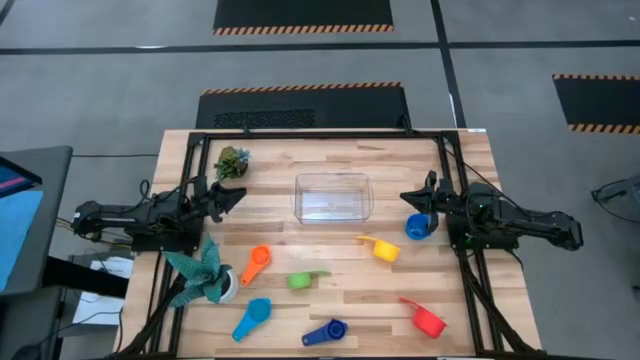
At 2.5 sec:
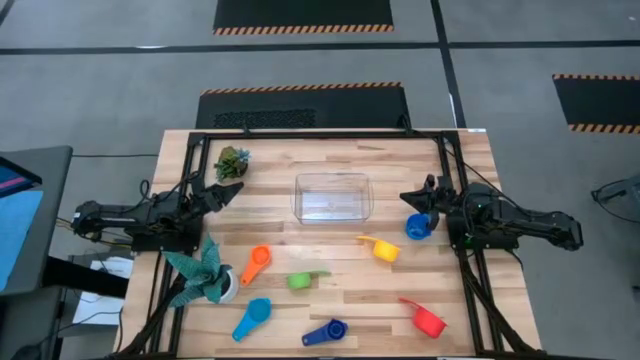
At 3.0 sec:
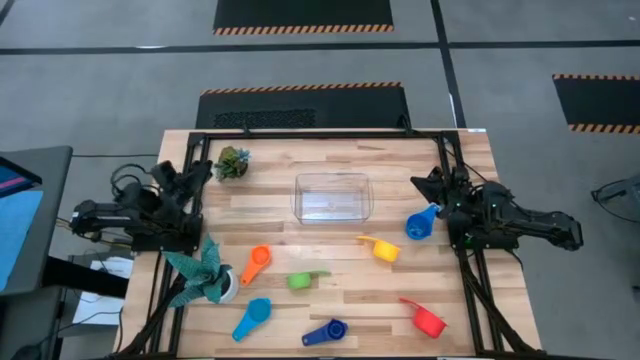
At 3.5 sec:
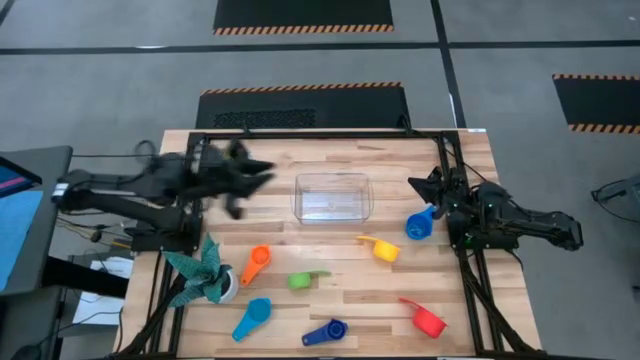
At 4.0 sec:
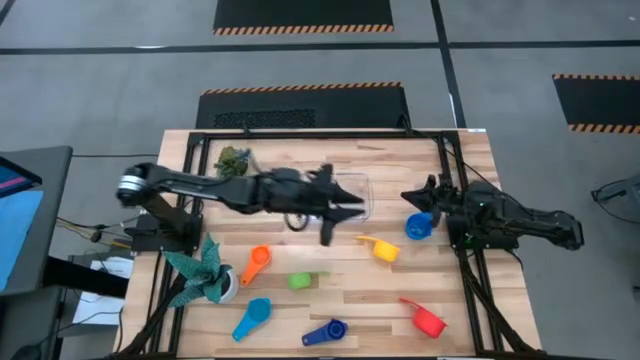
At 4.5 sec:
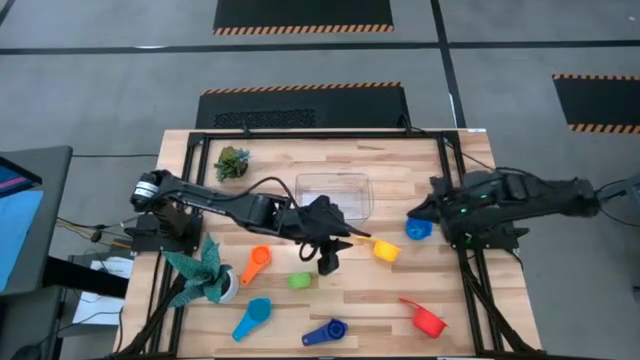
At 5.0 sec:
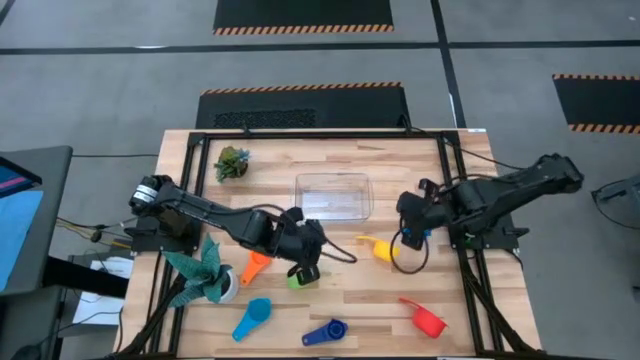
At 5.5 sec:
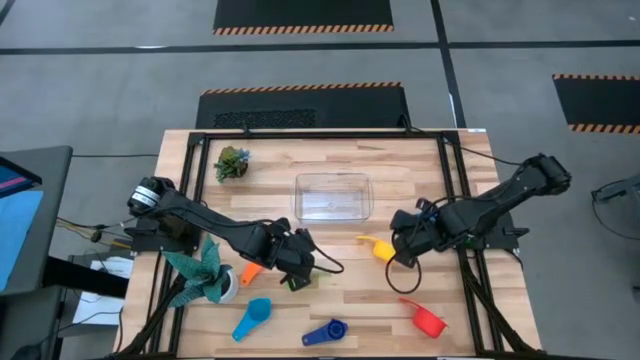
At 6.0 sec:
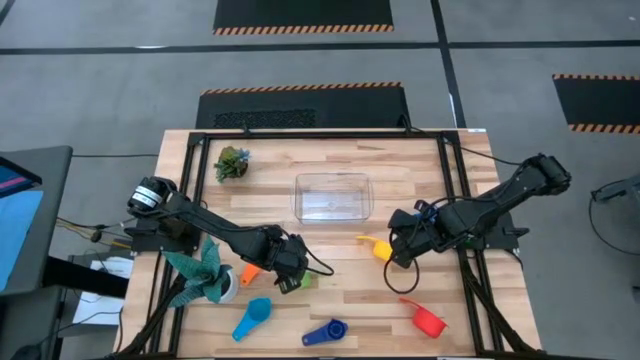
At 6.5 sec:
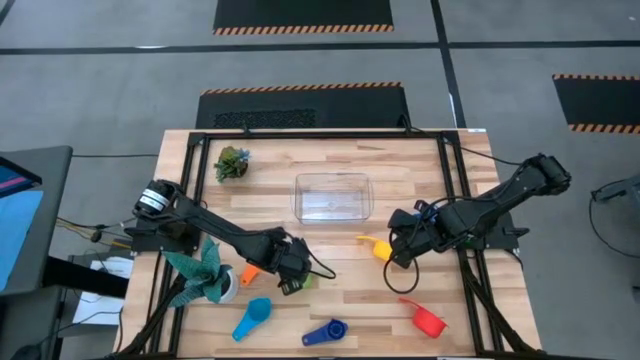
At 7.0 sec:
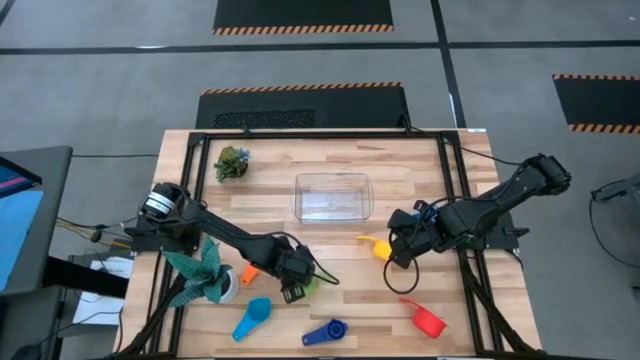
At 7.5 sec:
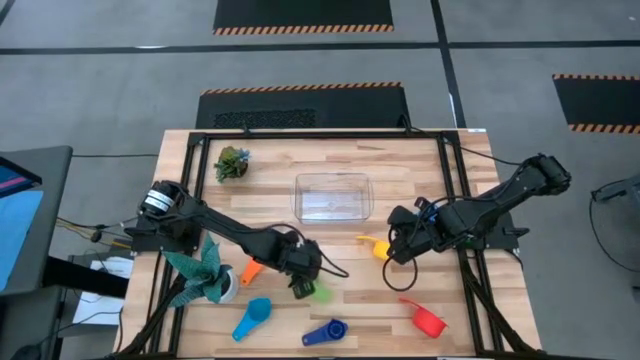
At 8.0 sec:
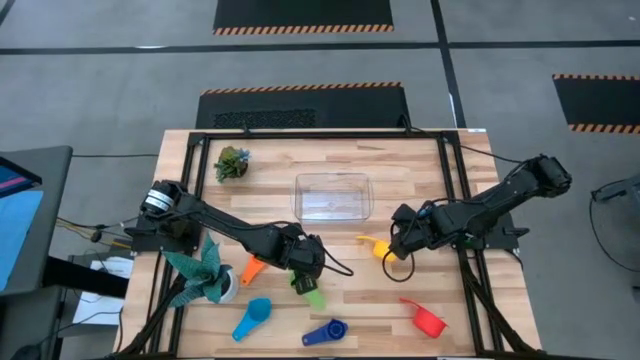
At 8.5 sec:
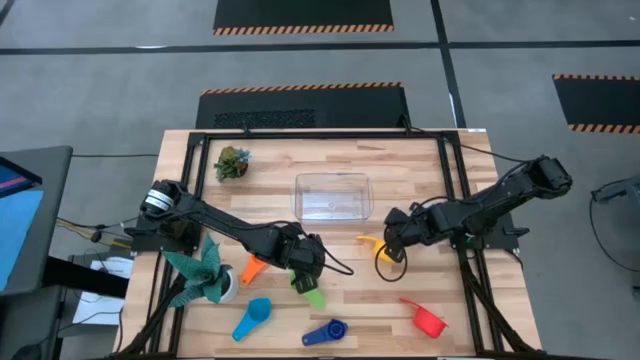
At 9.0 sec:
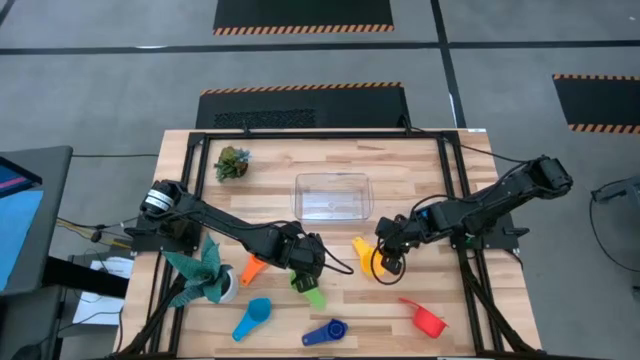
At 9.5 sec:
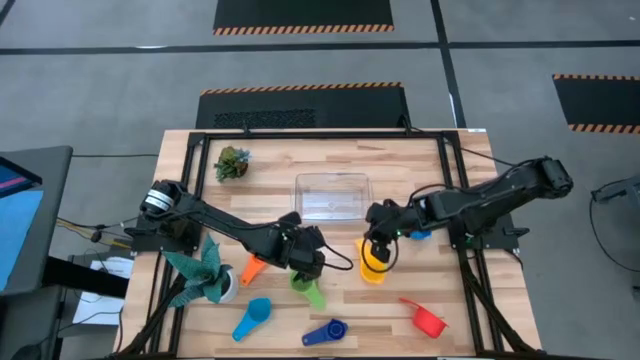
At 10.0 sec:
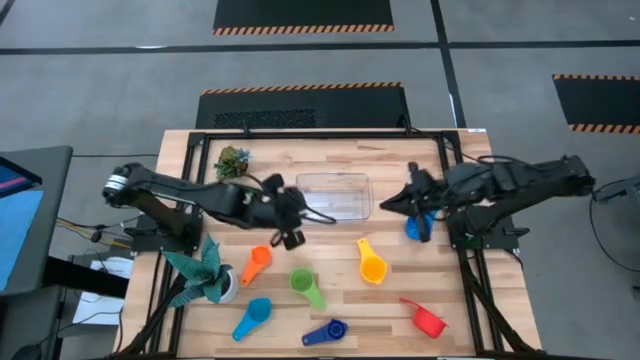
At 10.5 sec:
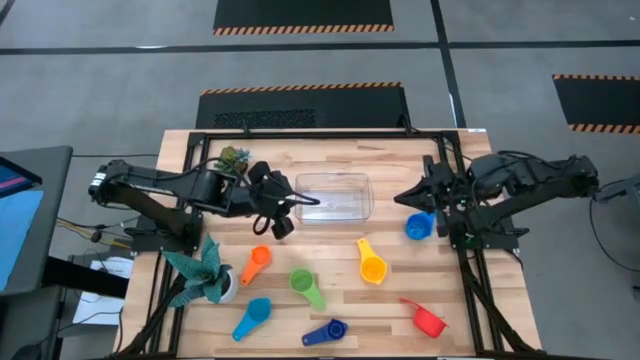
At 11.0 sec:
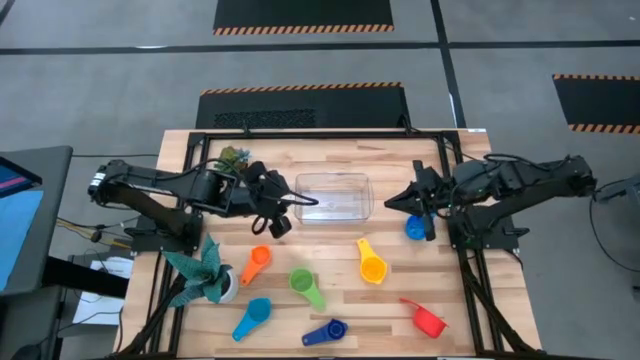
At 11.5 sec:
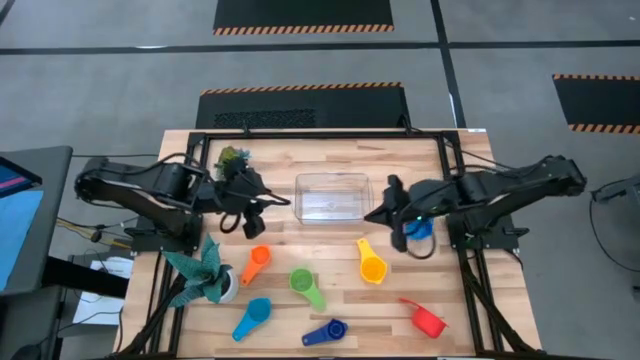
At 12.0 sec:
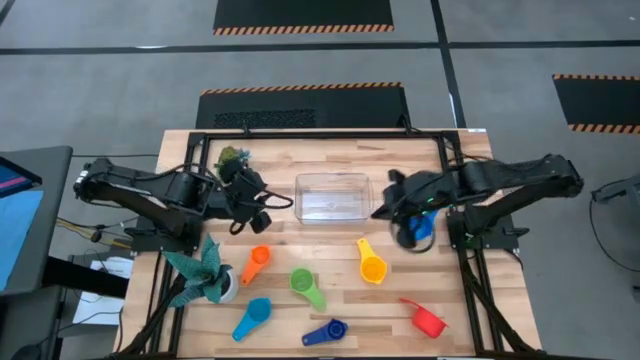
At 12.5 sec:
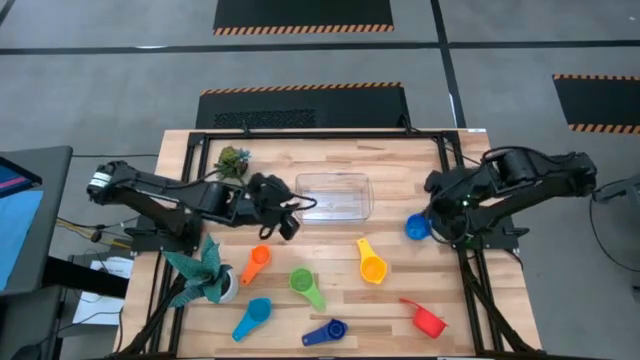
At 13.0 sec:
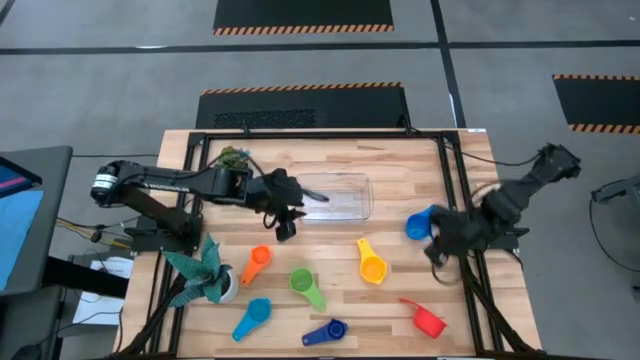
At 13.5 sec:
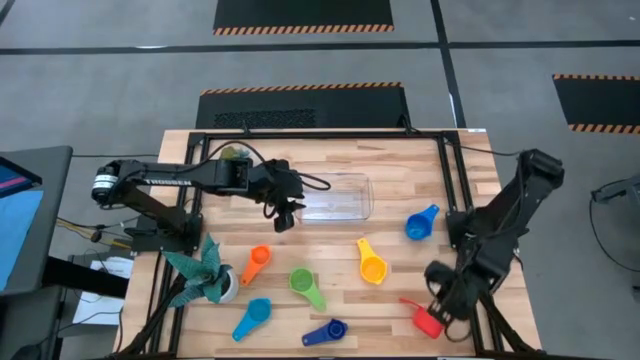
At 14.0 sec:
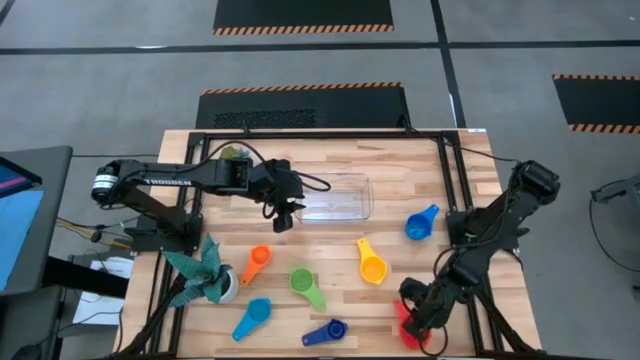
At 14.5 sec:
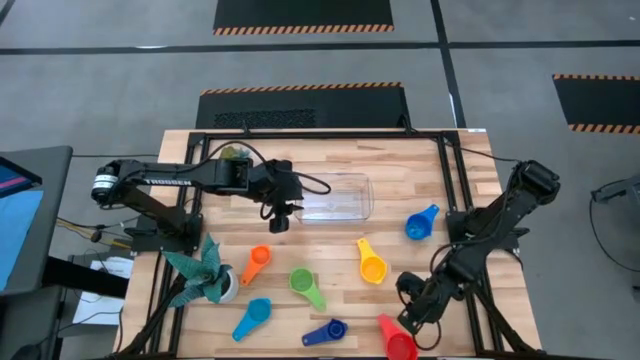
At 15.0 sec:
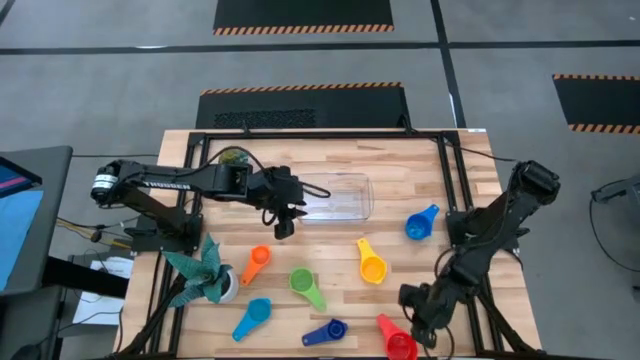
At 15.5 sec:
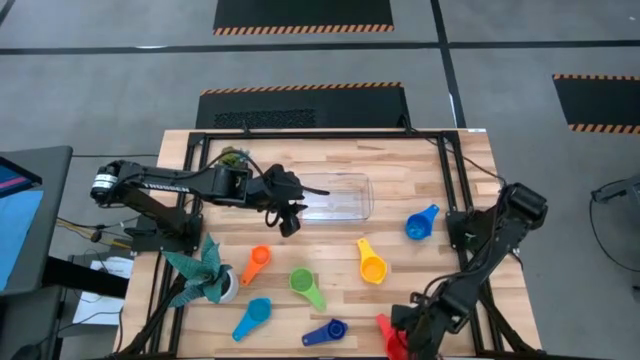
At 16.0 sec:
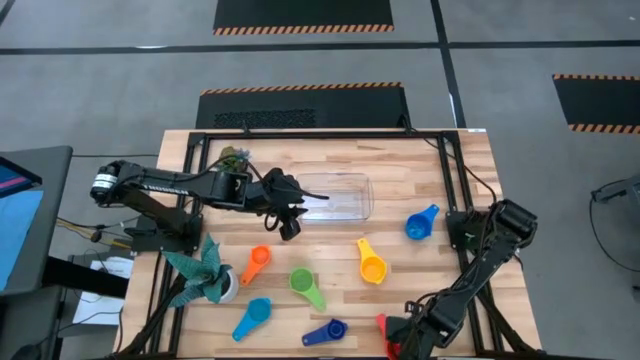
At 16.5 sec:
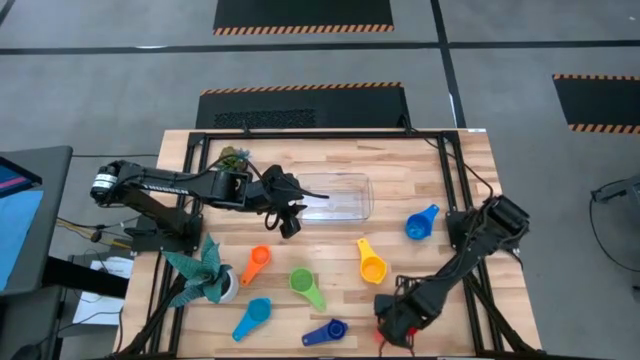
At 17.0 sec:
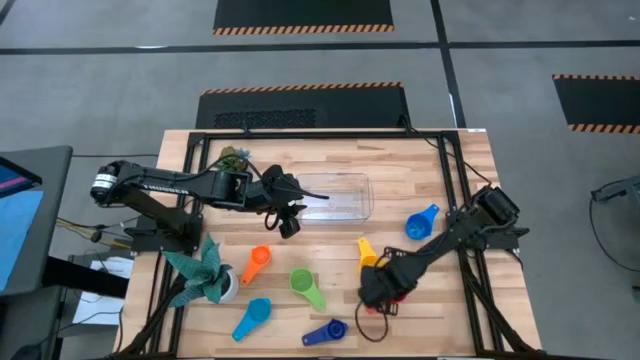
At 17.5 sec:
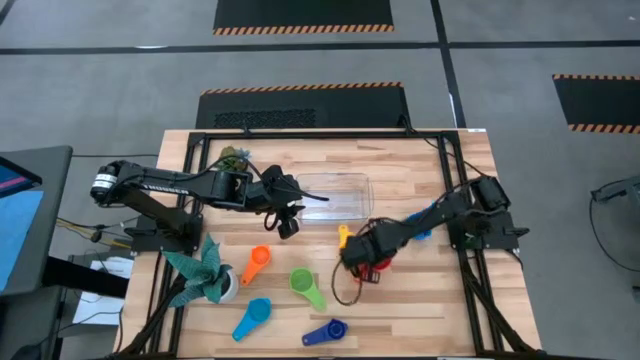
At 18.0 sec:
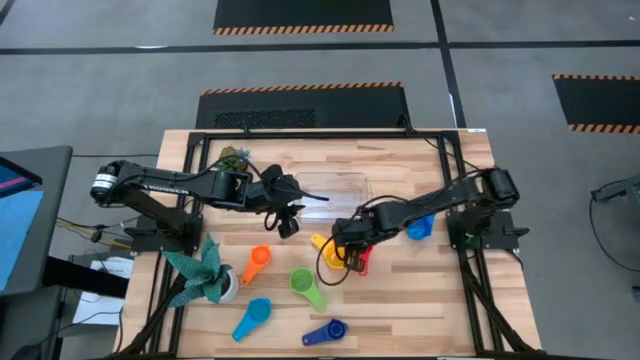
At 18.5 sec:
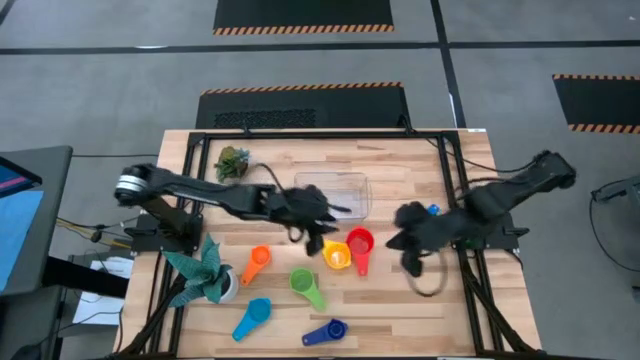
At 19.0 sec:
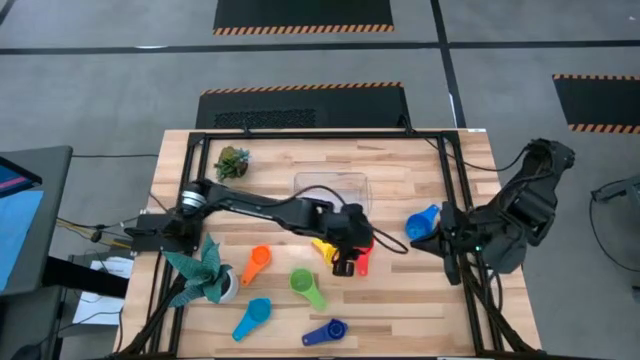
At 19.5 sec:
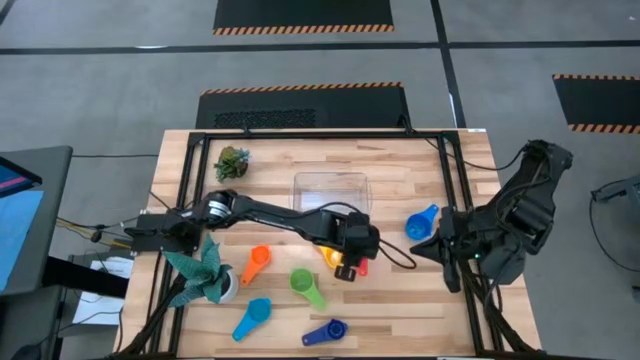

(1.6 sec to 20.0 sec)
Task: Nest measuring cups in basket
Adjust the measuring cups on the table

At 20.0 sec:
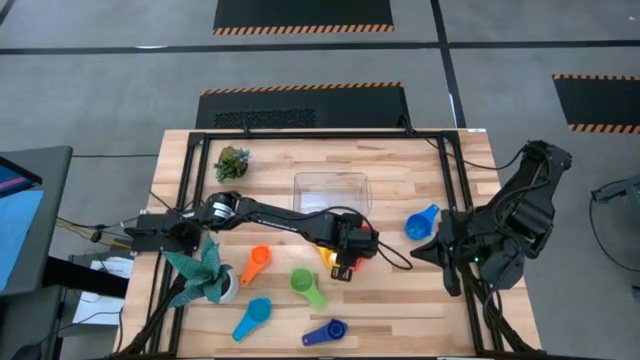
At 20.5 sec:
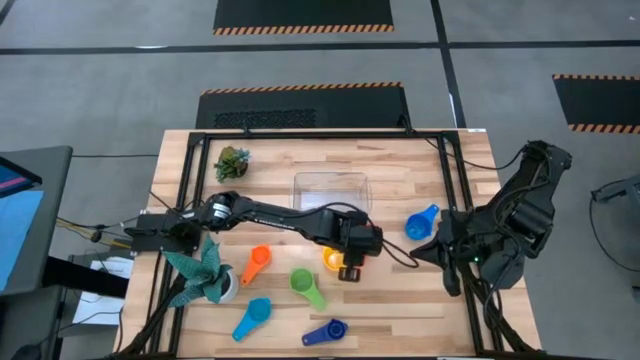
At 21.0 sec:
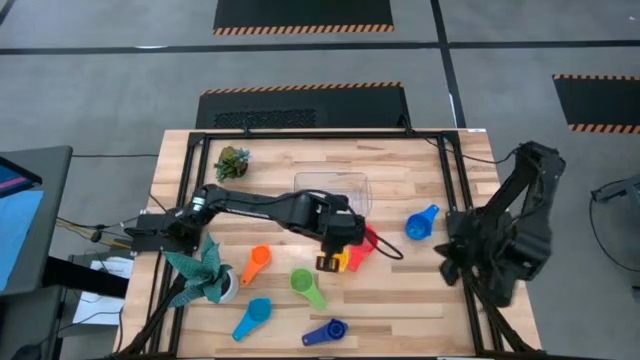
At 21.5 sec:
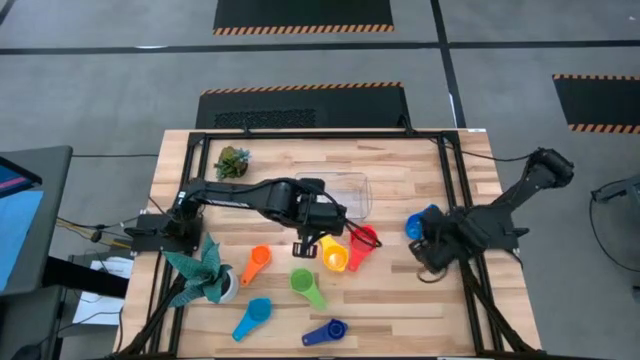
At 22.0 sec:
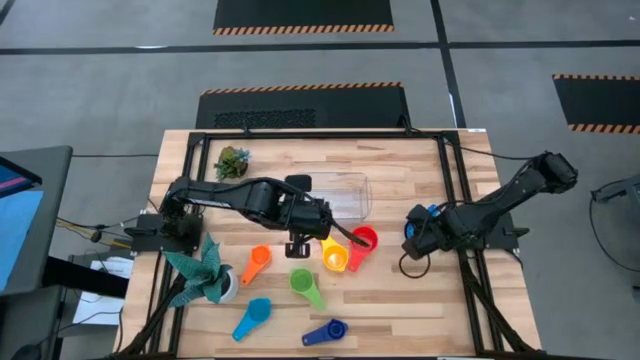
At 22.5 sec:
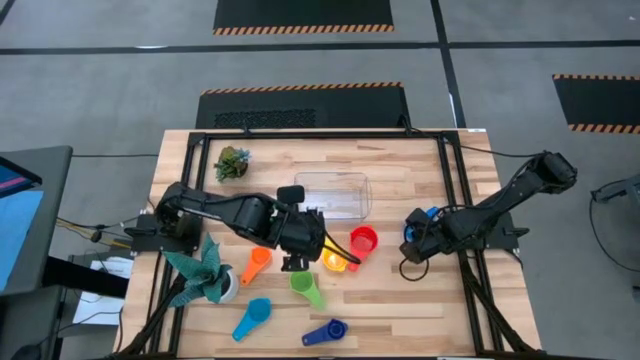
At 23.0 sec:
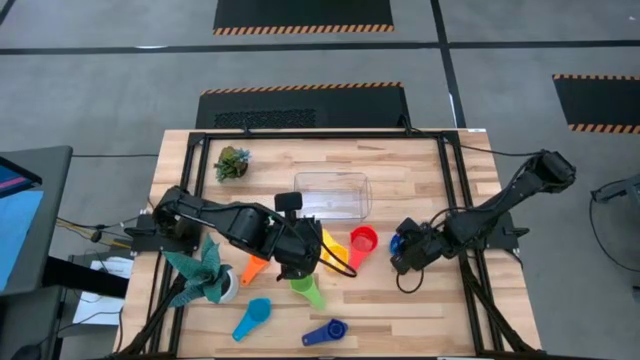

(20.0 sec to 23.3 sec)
Stack the blue measuring cup on top of the red measuring cup
